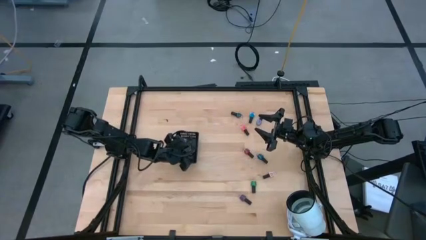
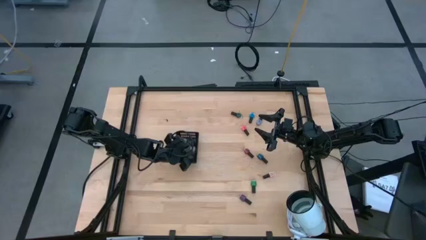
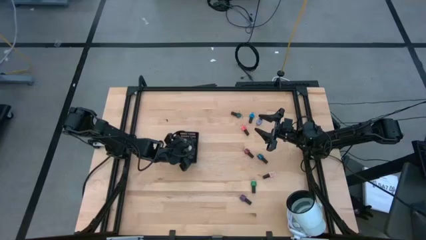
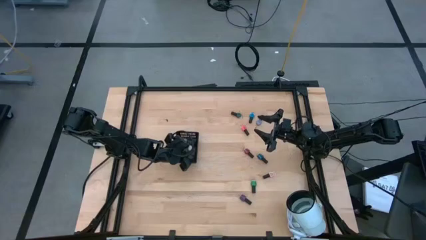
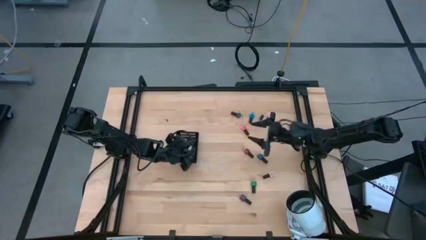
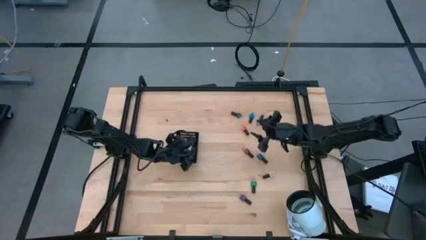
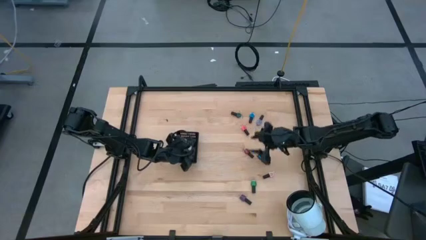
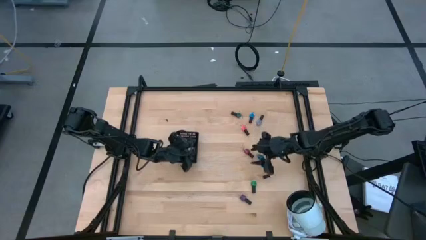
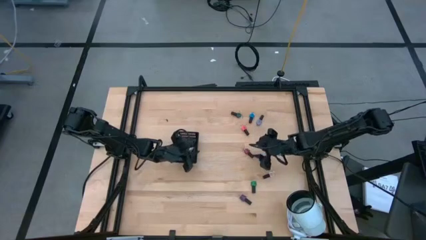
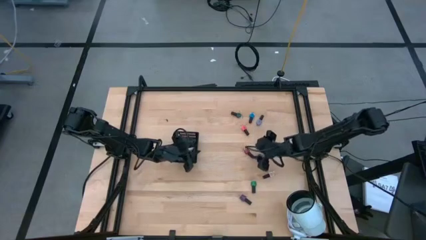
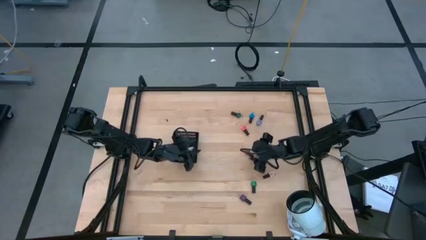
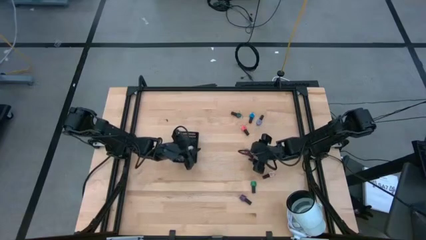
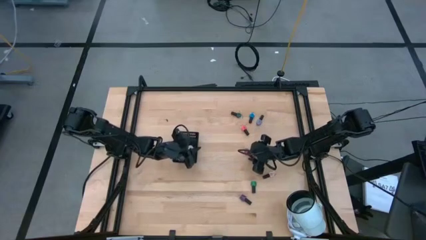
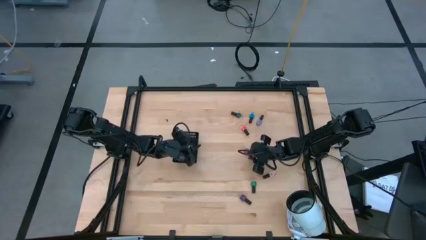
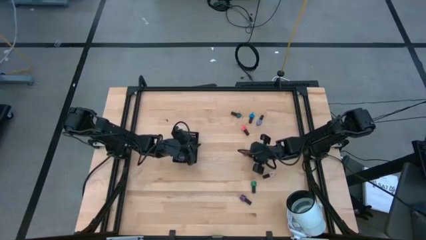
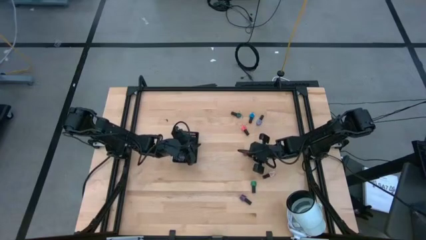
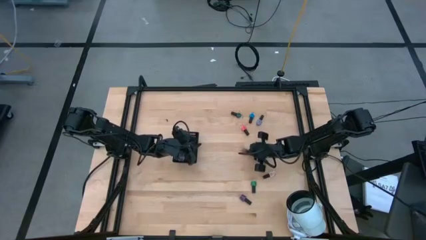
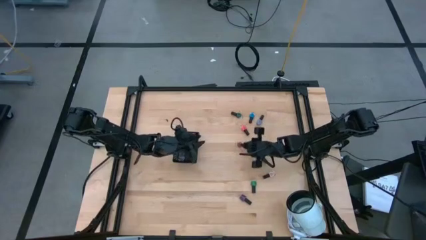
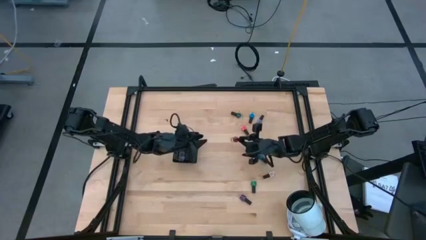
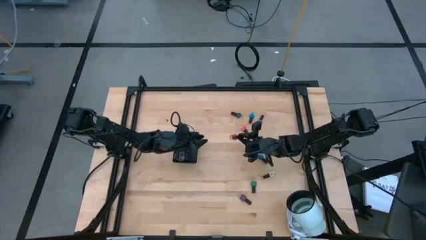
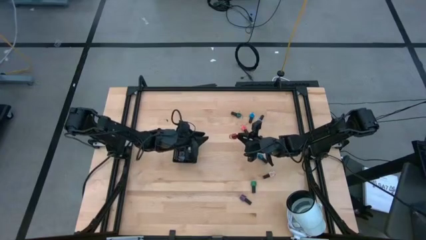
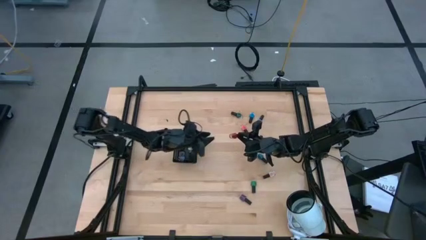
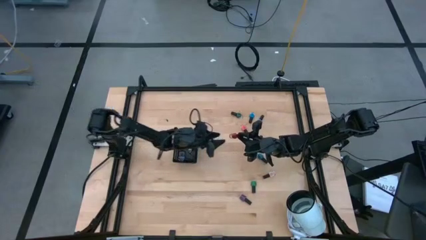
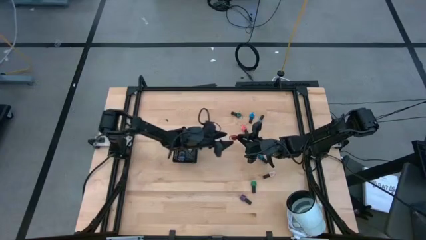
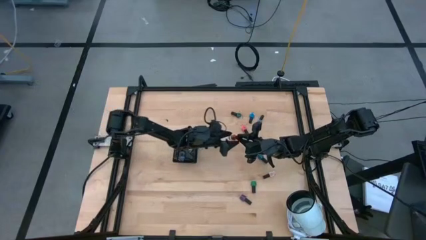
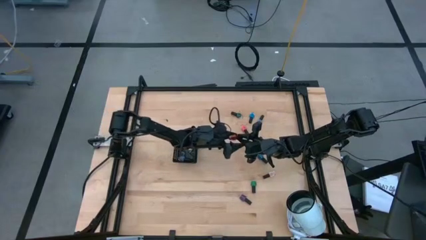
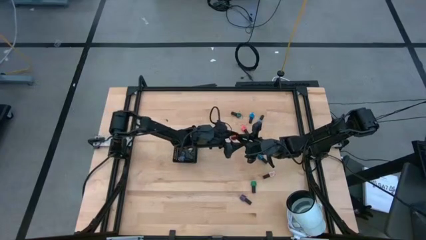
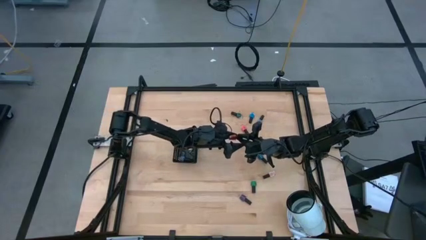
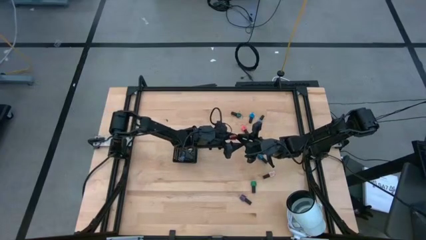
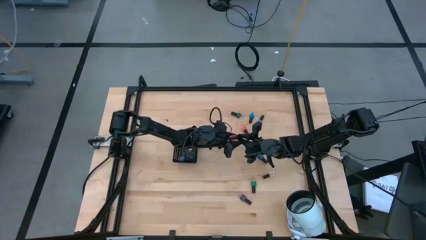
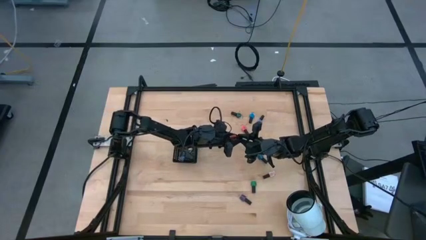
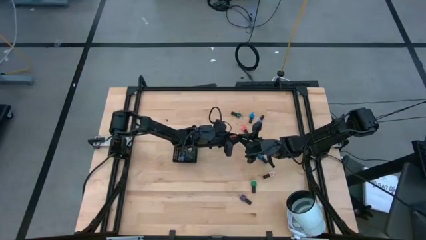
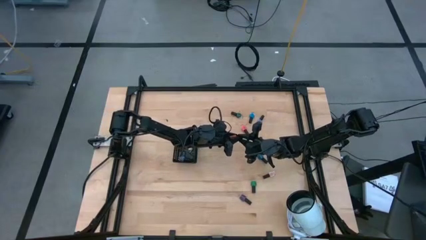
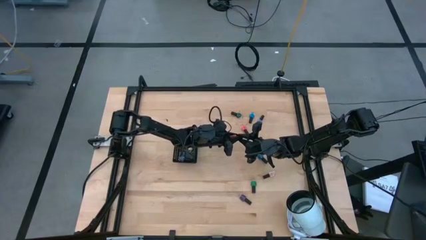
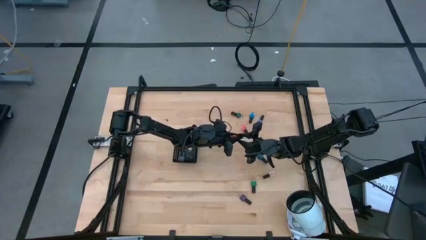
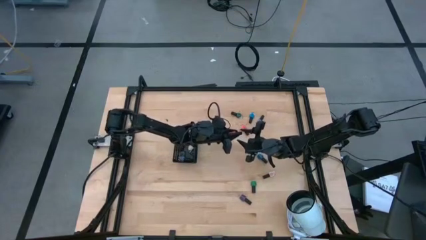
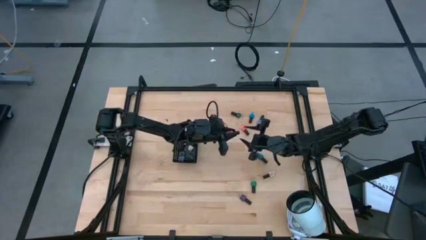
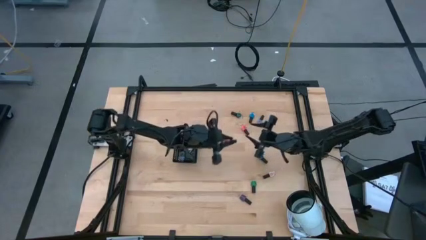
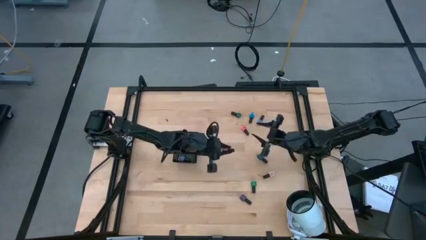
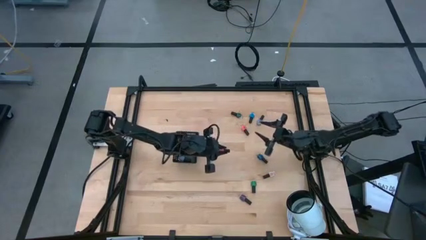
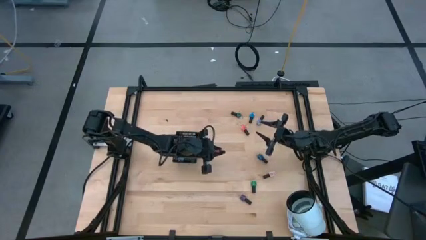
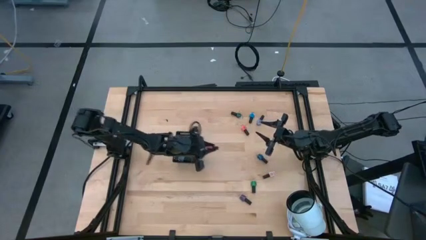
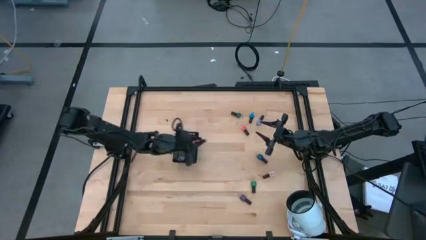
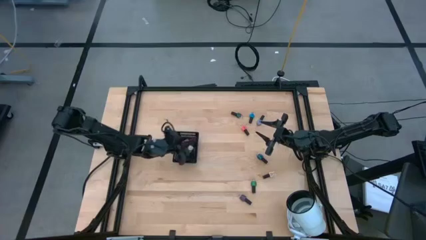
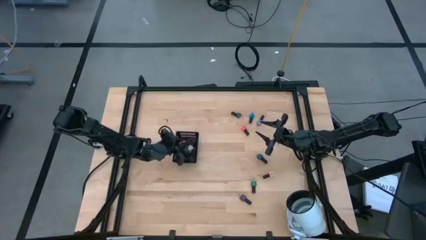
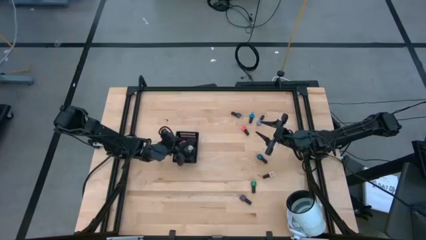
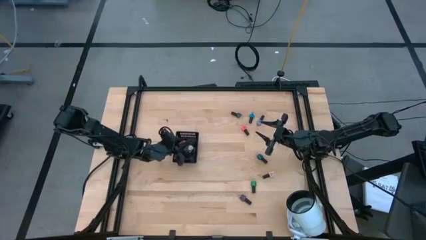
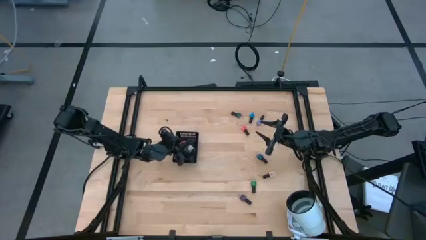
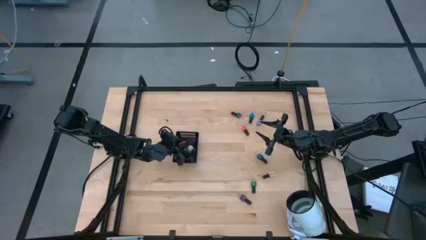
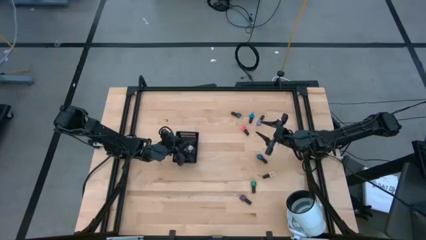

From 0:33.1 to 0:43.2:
Task: Pick & Place Nail Polish
Put the red nail polish into the basket
